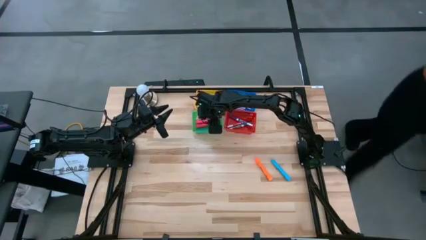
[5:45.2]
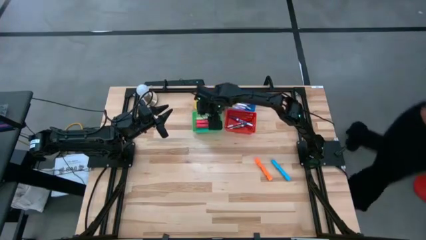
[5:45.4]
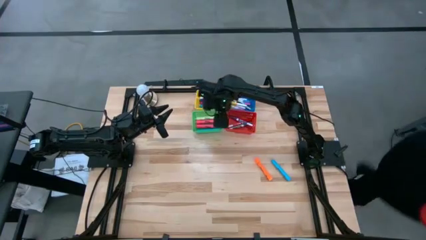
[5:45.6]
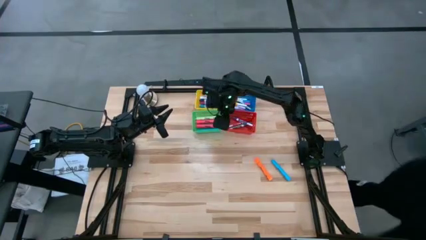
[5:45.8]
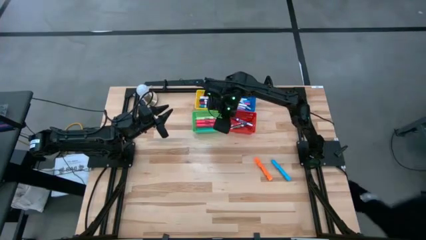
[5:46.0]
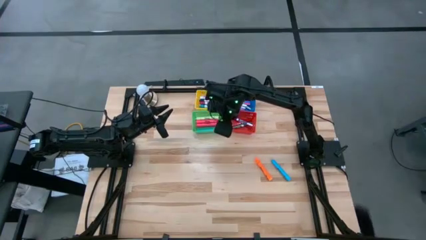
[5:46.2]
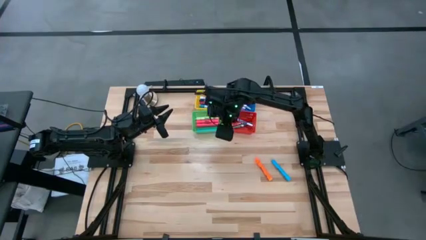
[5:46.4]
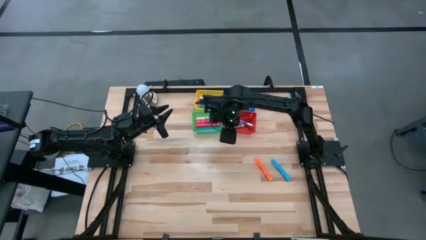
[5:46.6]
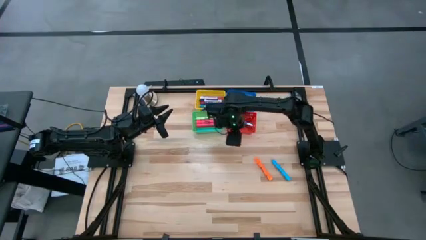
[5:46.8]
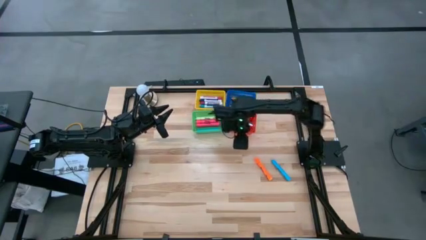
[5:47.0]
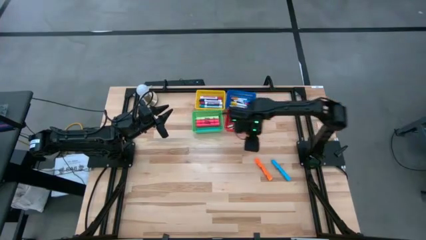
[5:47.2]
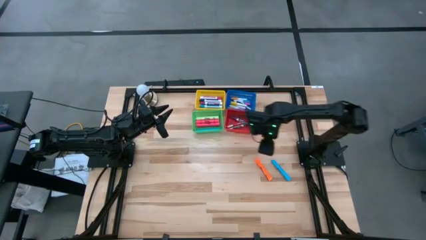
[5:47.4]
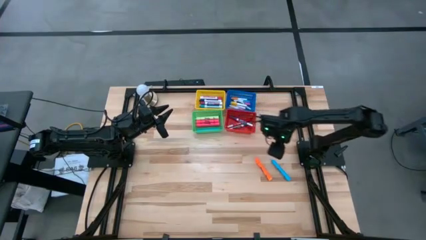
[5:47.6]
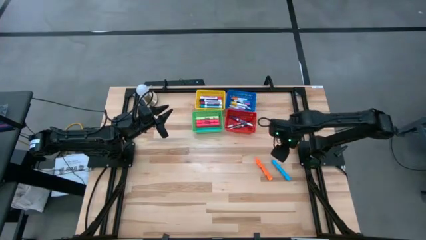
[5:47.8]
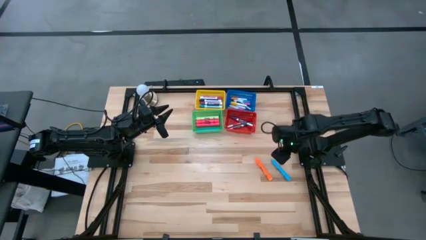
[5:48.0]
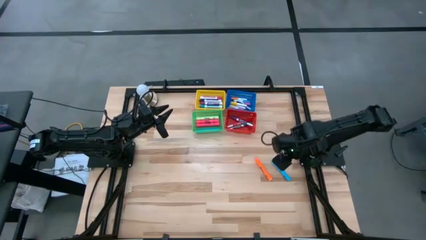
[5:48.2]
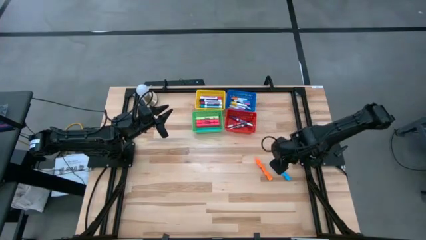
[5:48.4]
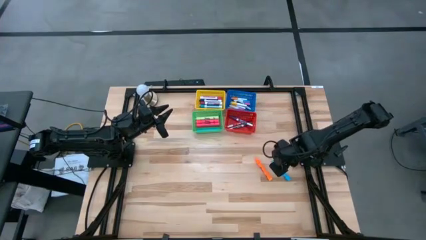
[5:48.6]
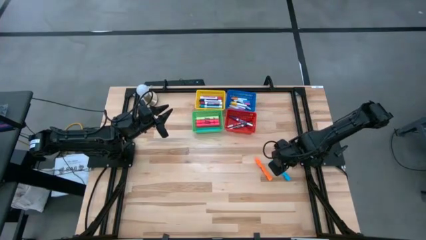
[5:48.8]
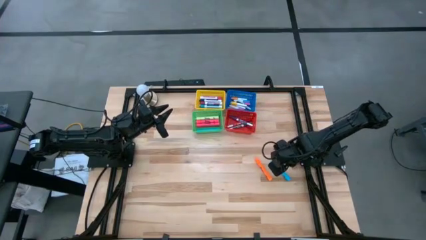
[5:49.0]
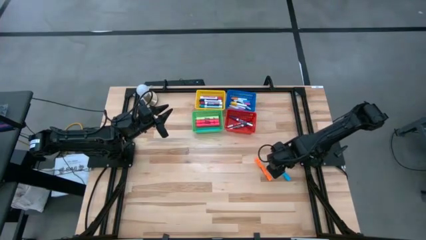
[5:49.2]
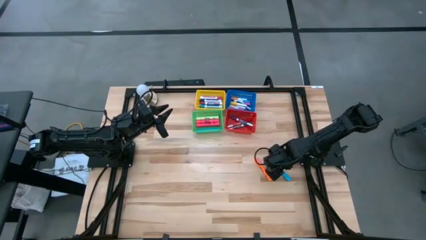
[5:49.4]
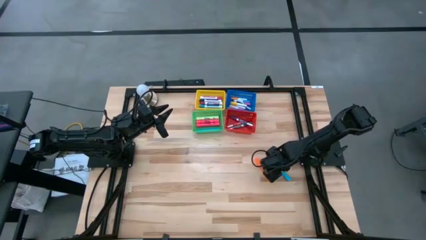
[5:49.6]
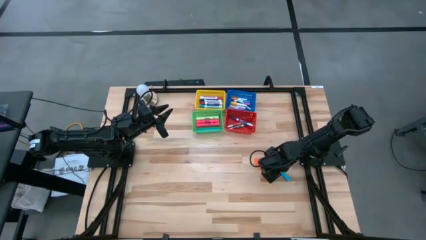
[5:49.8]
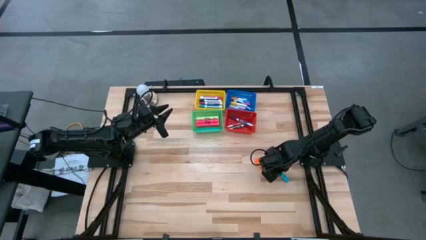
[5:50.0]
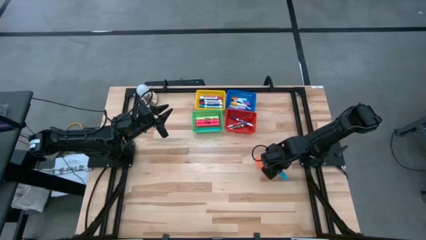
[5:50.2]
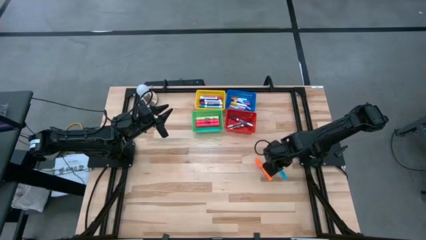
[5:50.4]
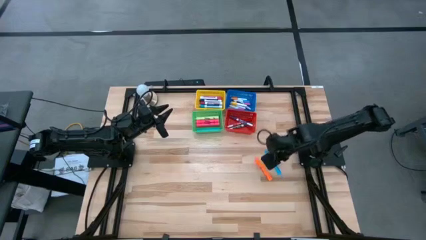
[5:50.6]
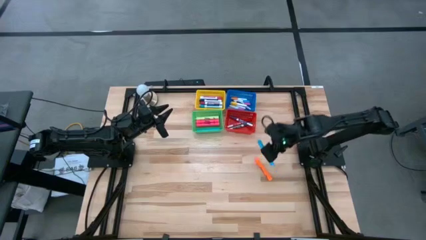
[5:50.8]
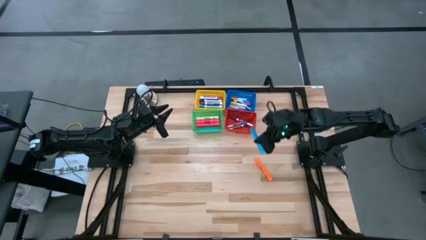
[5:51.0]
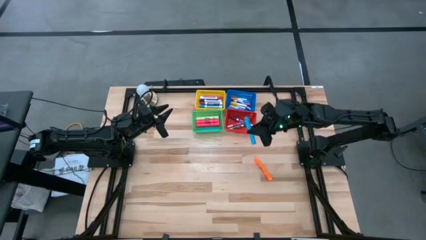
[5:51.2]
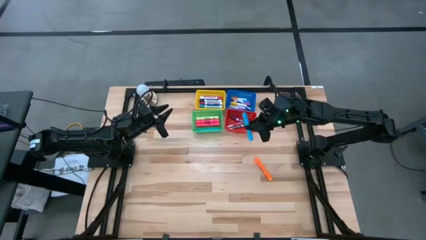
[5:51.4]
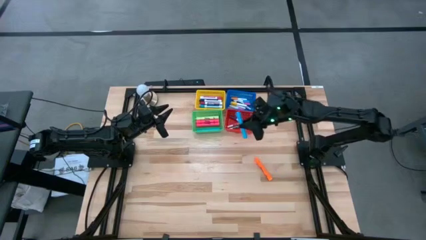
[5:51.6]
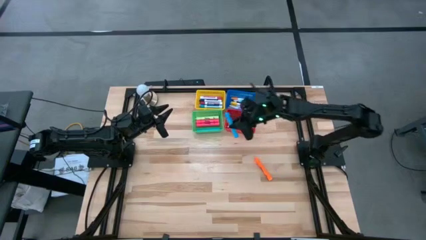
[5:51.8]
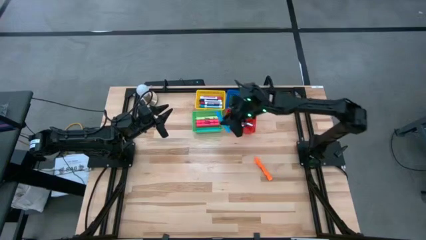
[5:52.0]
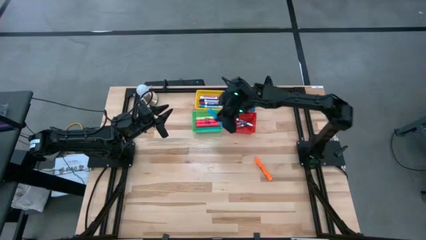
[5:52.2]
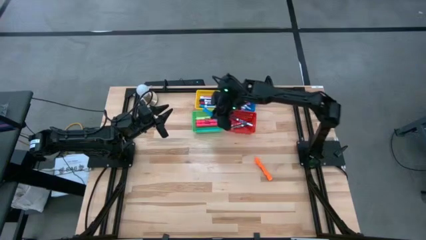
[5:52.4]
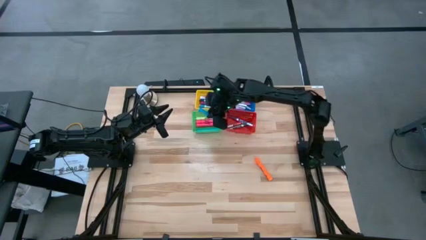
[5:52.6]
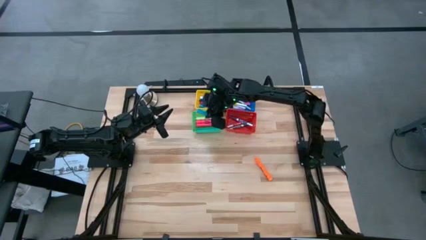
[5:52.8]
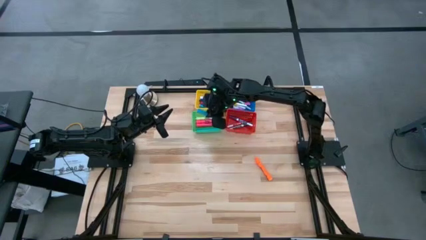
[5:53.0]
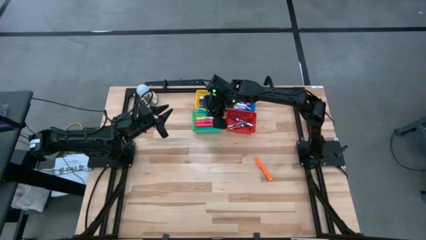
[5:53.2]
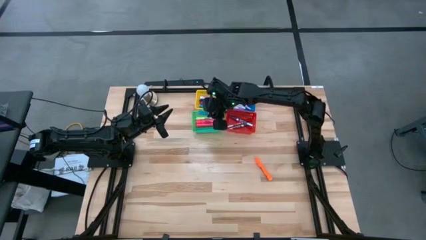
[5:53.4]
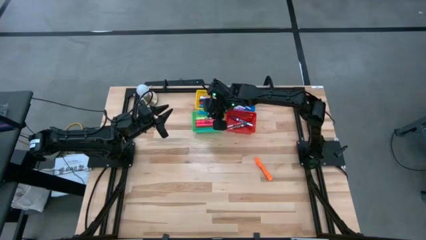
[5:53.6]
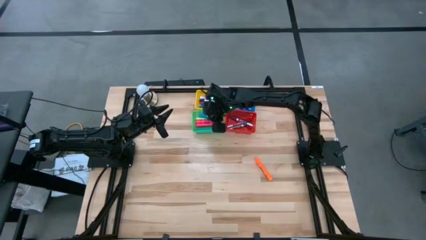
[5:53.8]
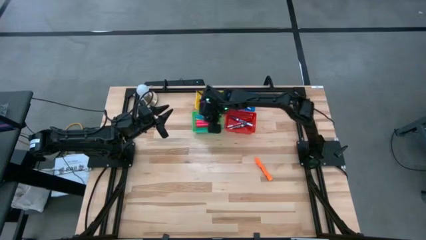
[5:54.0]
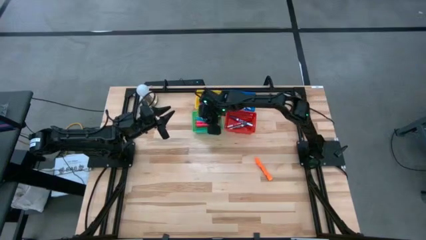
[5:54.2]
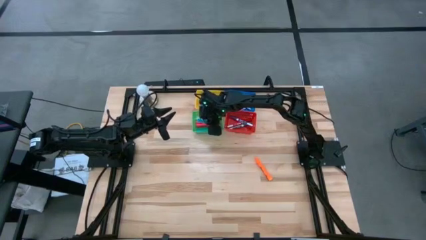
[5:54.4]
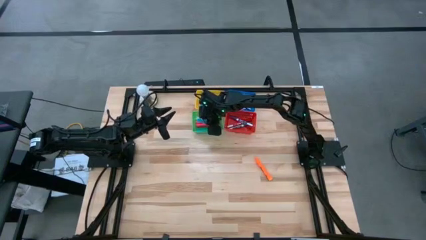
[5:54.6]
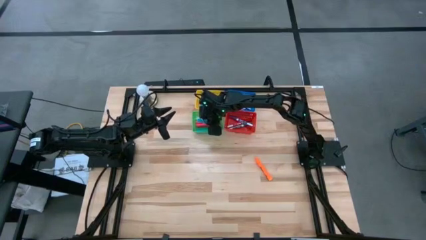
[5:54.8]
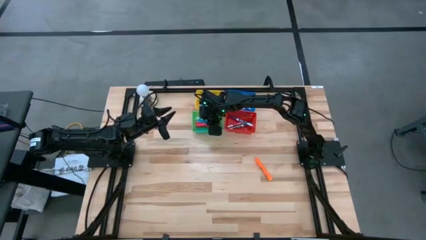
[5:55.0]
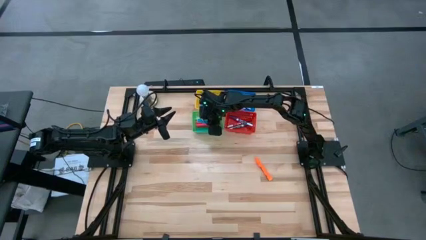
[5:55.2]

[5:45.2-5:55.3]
Task: Pick & Place Markers
Put the large blue highlighter pen into the green bin
